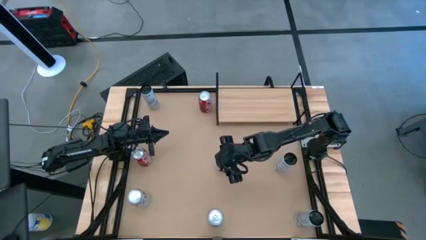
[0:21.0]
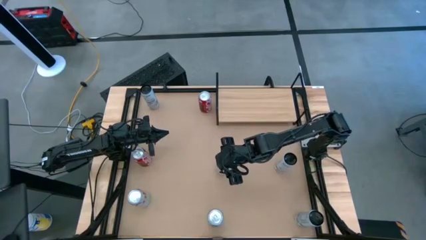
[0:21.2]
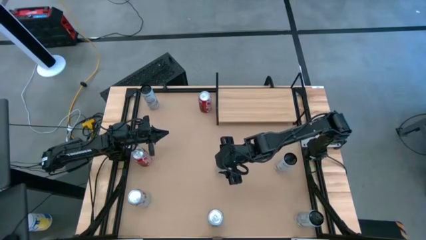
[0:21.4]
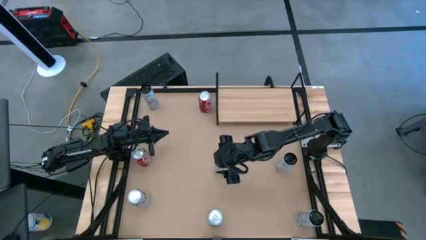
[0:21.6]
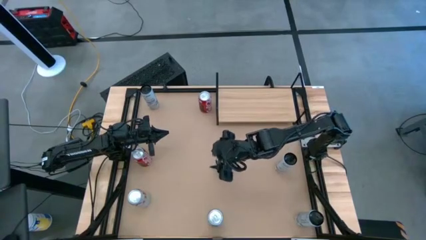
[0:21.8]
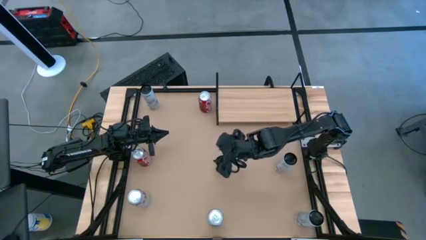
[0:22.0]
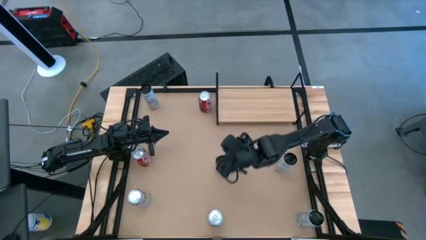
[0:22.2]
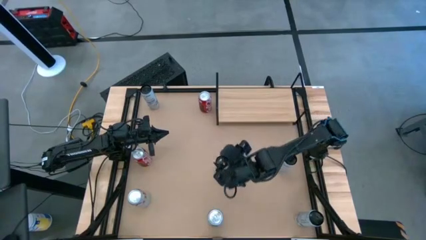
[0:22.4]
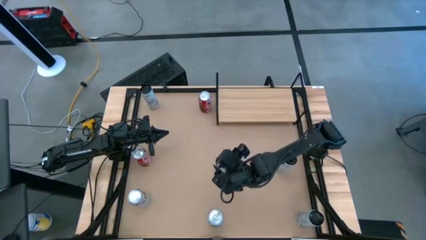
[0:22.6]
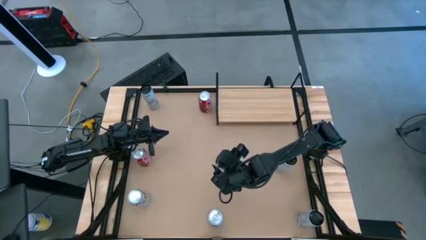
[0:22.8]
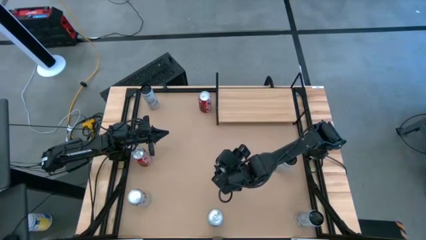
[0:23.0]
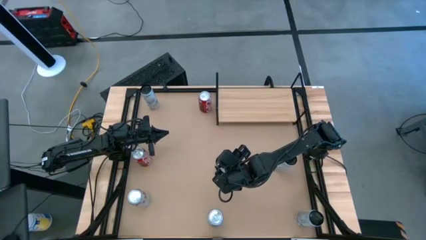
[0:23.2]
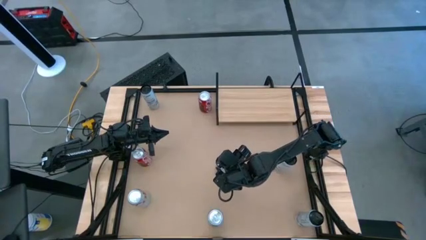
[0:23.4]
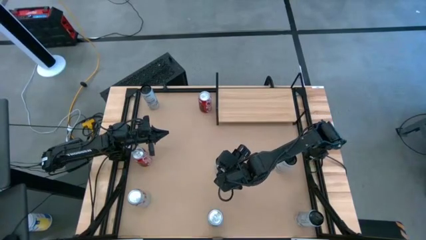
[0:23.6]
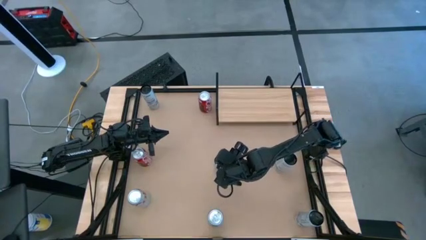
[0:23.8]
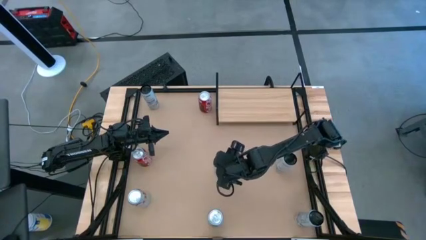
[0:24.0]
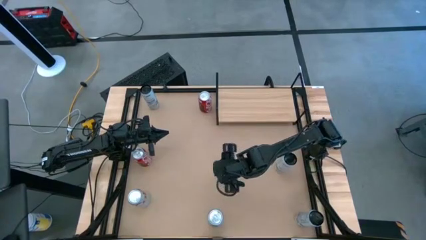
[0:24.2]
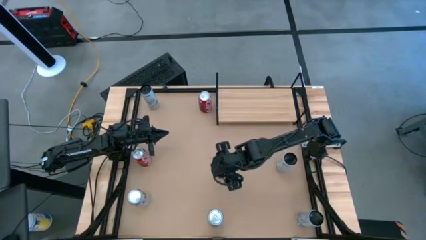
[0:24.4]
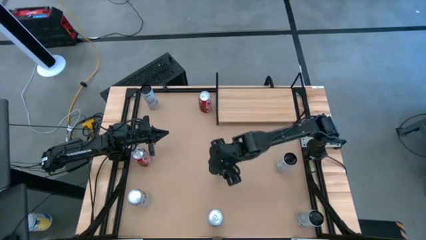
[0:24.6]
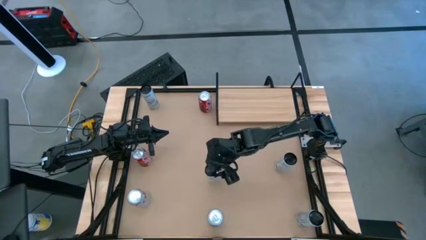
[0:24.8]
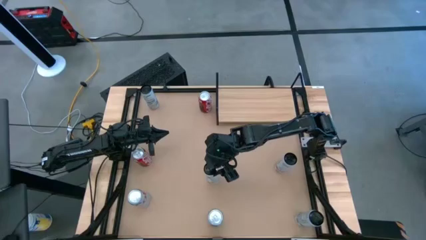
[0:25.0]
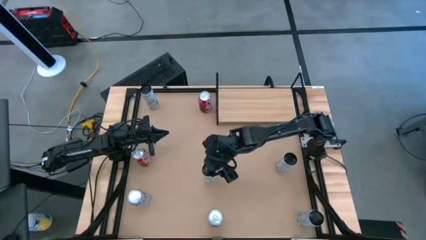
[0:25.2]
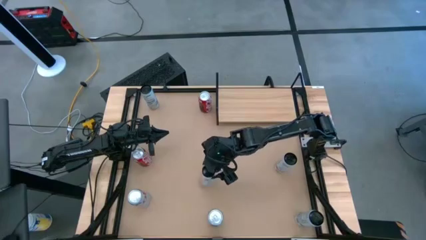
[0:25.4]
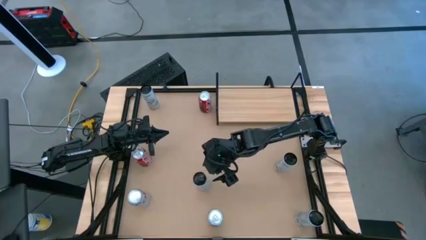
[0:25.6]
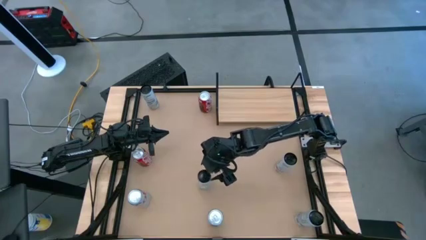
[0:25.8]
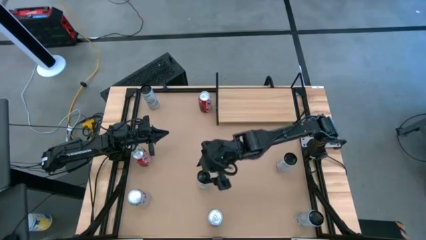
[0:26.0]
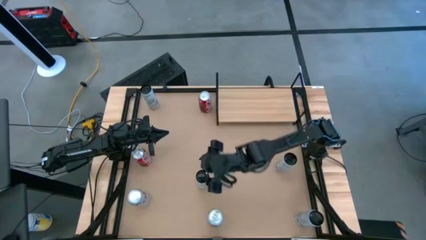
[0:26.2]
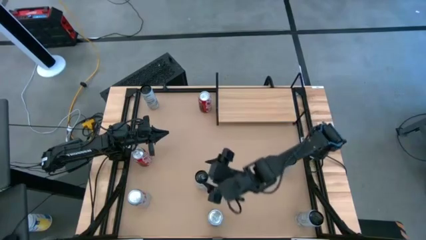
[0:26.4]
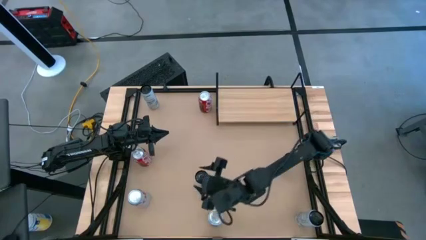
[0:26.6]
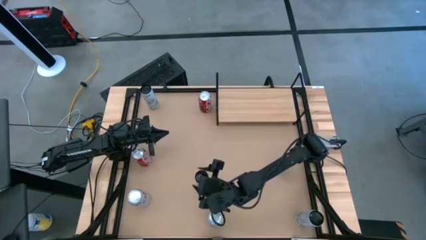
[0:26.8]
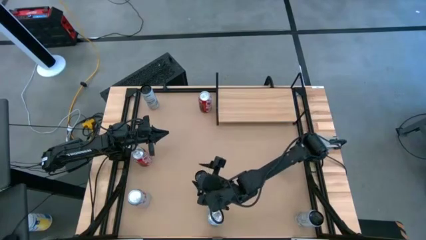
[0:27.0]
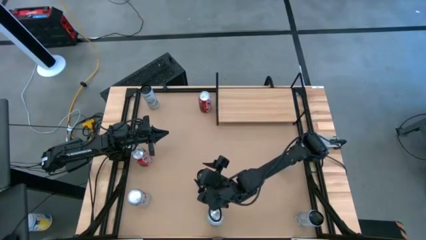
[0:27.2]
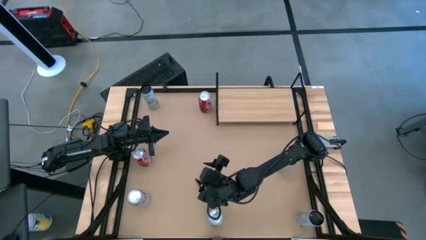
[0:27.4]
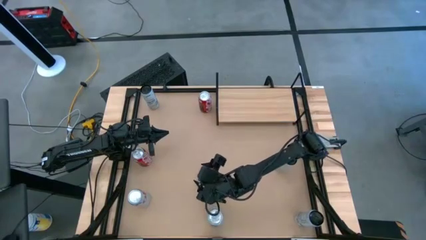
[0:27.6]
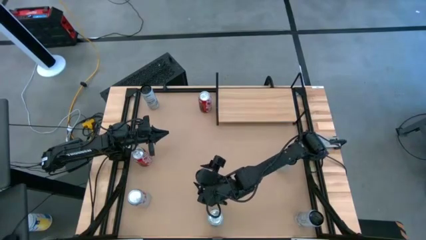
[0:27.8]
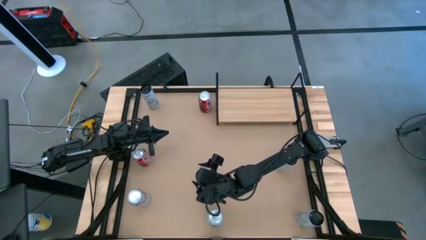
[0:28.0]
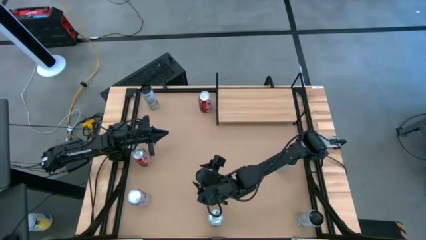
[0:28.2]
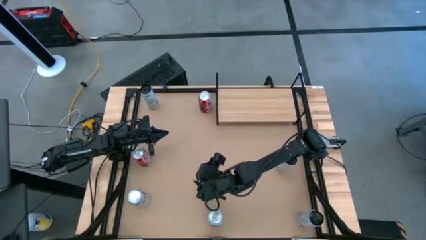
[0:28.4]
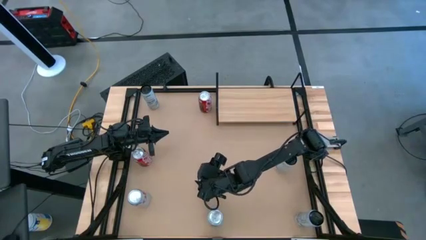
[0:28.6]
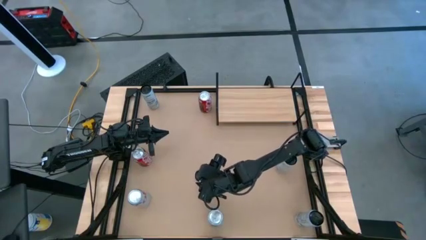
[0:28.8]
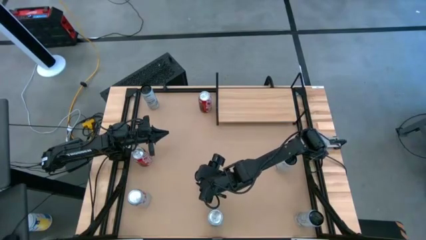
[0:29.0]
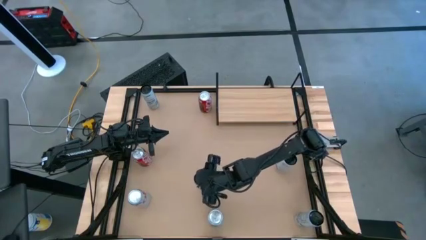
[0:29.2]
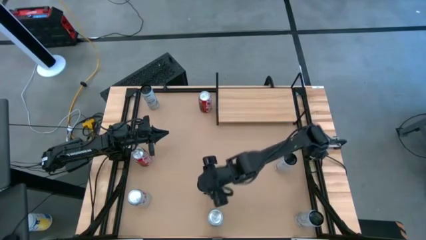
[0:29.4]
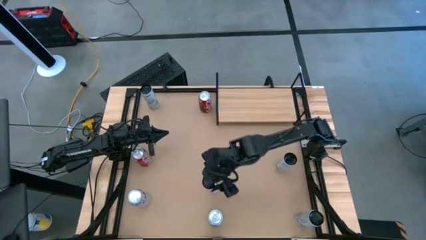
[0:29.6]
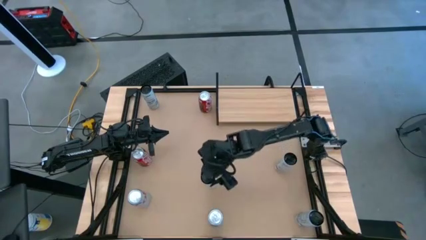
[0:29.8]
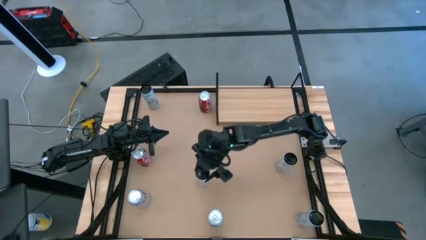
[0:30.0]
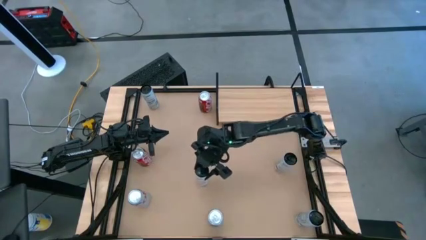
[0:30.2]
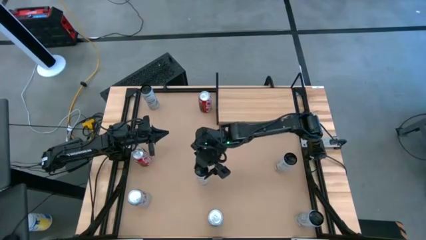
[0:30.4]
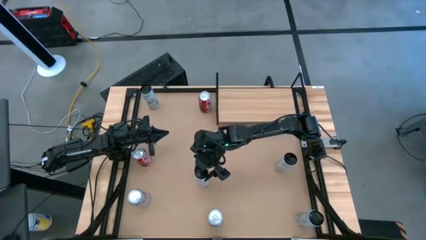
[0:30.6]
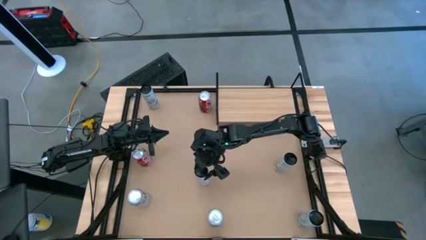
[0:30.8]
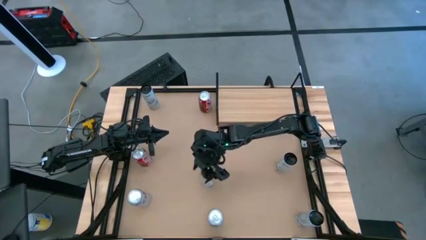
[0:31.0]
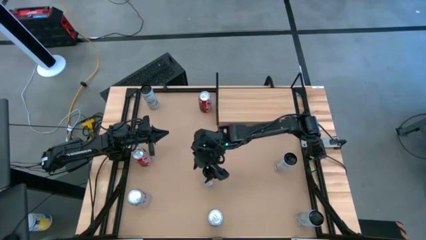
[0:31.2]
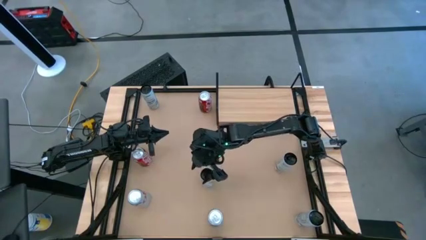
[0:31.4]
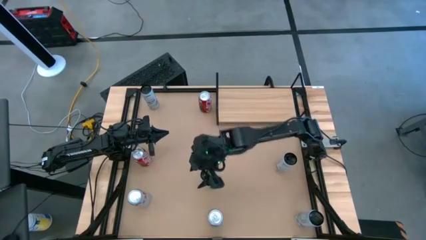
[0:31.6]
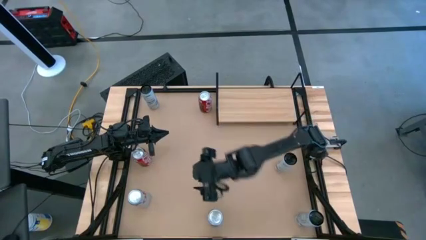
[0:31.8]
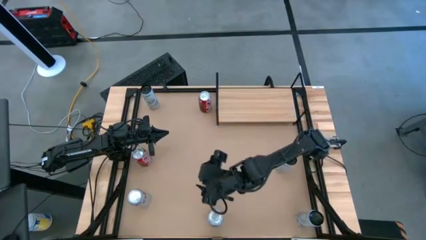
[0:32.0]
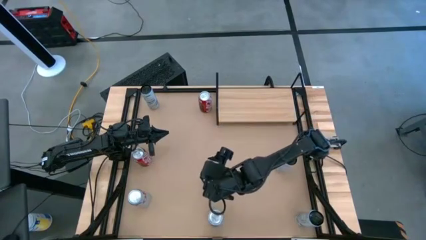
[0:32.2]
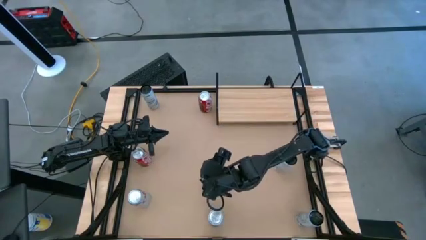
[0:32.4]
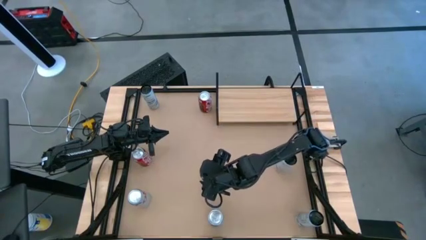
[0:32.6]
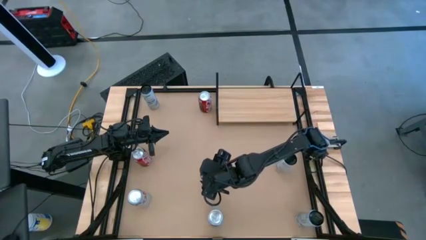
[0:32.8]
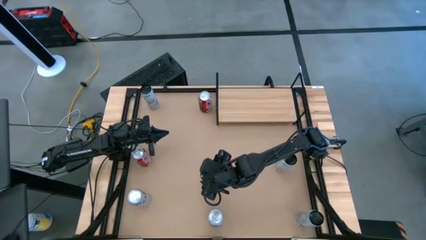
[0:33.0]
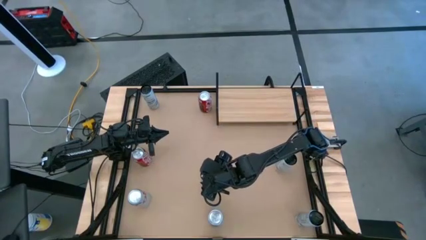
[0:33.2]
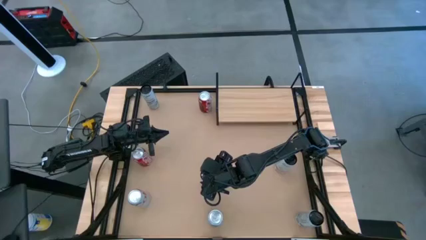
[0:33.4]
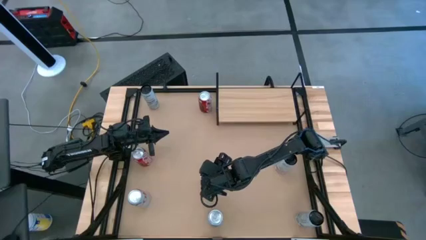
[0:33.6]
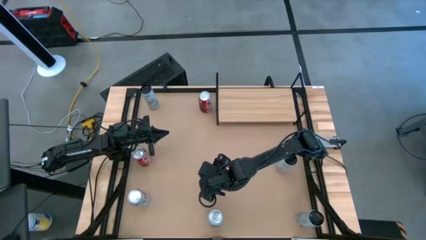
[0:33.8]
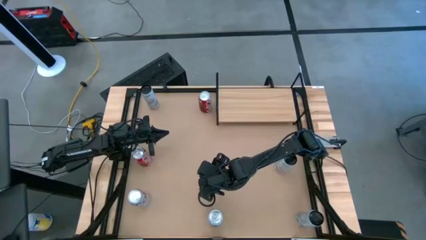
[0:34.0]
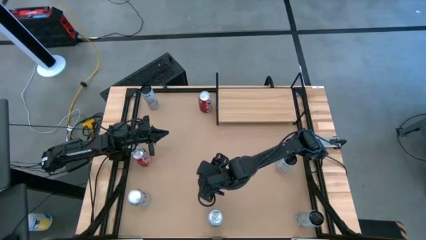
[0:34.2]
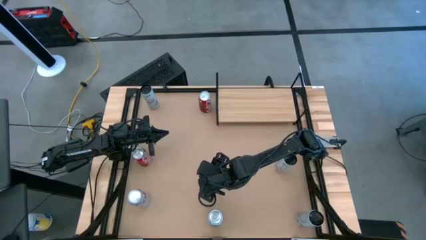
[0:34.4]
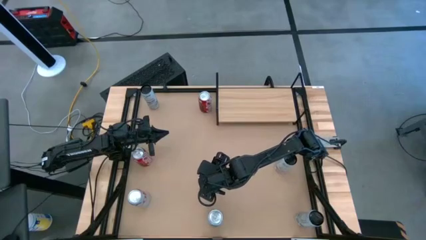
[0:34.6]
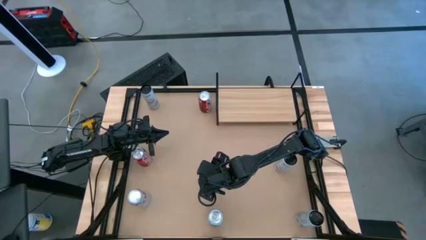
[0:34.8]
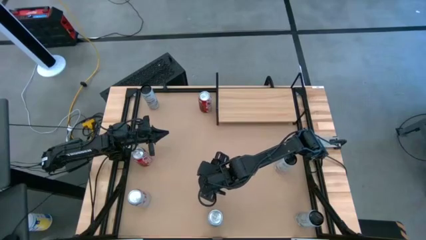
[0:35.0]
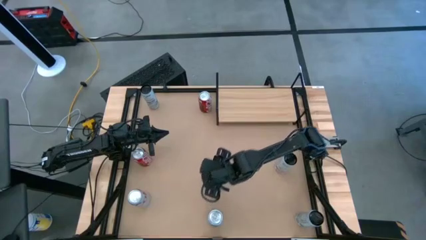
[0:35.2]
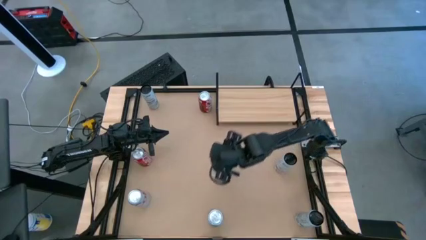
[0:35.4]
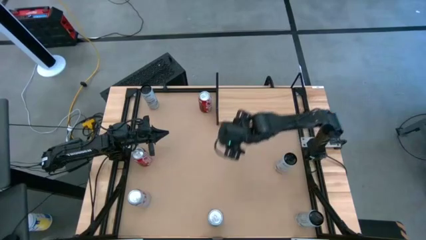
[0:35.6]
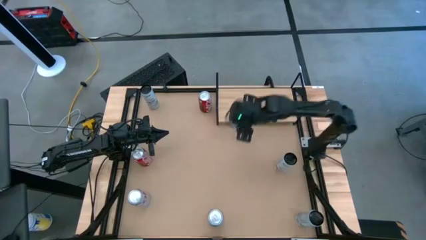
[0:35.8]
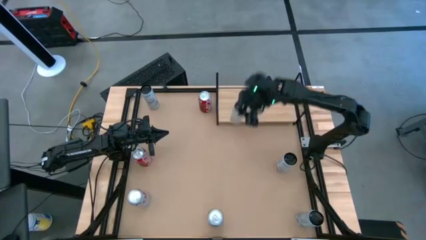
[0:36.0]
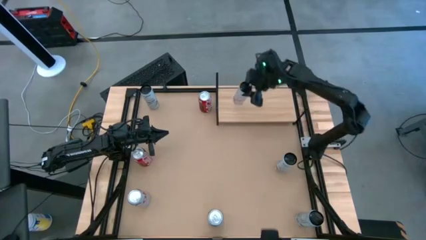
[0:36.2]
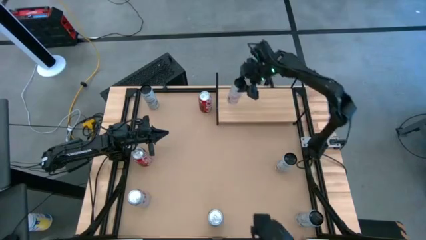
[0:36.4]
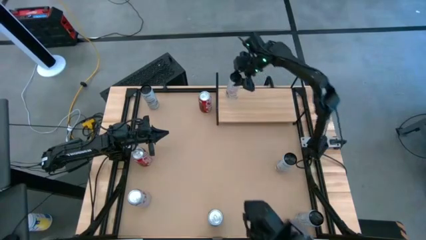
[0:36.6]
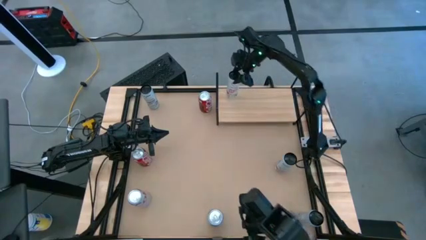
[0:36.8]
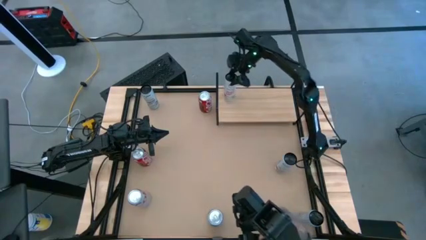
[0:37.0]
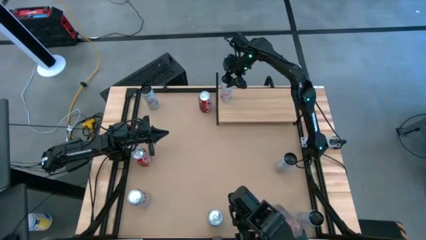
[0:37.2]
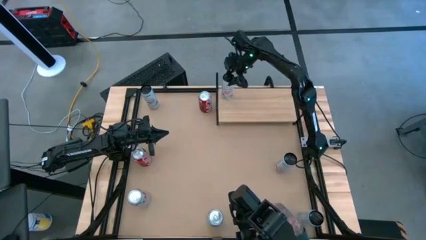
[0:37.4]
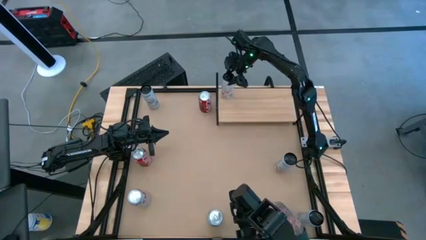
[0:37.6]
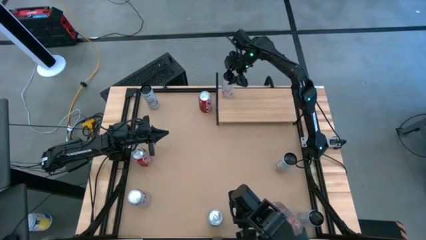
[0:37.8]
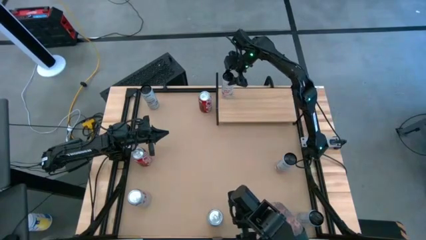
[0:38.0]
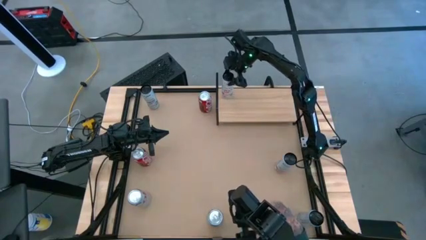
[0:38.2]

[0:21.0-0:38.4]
Task: Place canned beverage on shelf
Put the left white-pink soda can on the shelf
